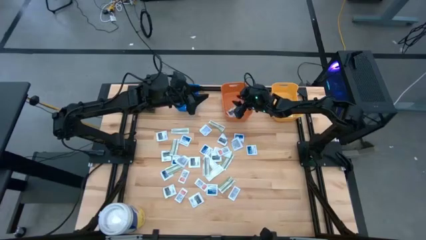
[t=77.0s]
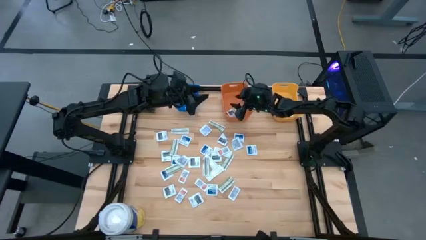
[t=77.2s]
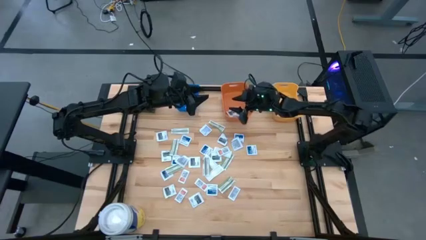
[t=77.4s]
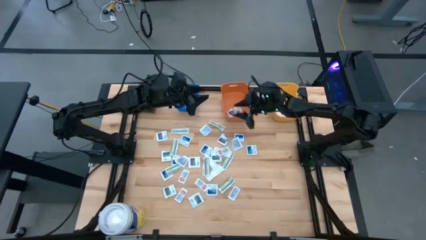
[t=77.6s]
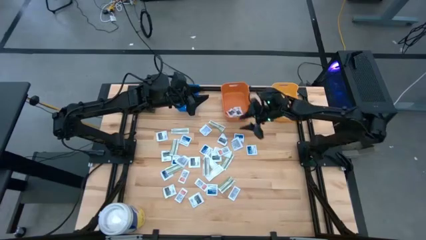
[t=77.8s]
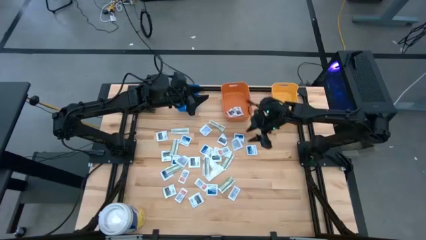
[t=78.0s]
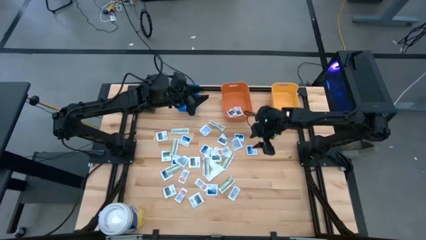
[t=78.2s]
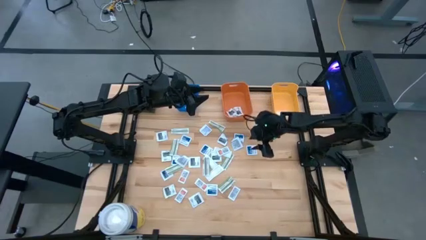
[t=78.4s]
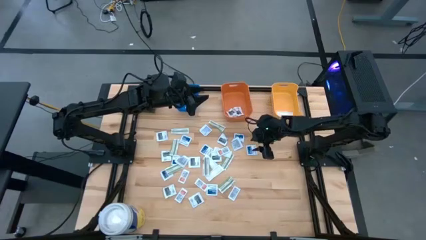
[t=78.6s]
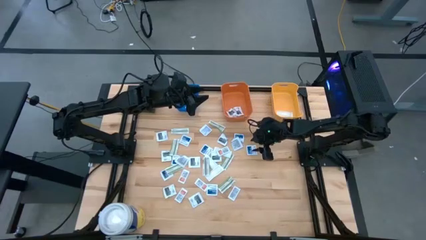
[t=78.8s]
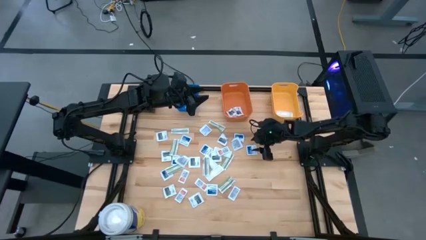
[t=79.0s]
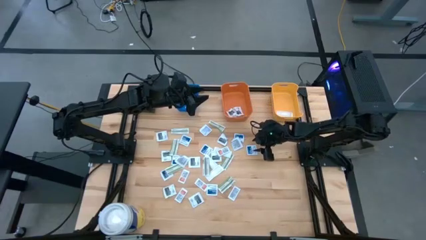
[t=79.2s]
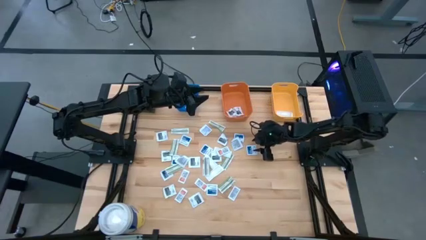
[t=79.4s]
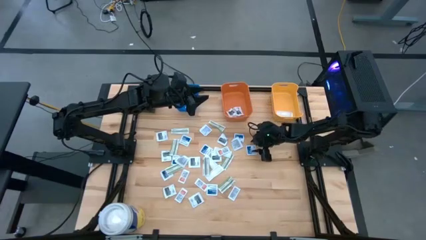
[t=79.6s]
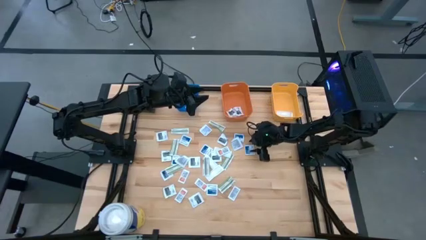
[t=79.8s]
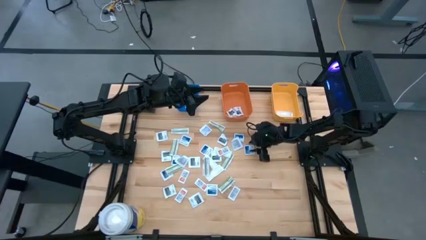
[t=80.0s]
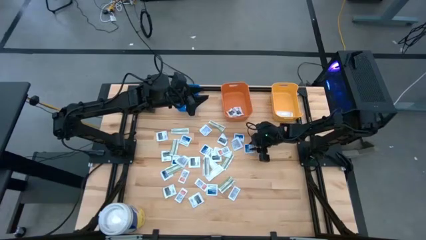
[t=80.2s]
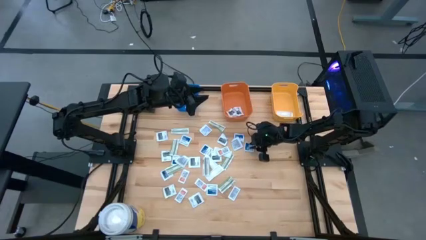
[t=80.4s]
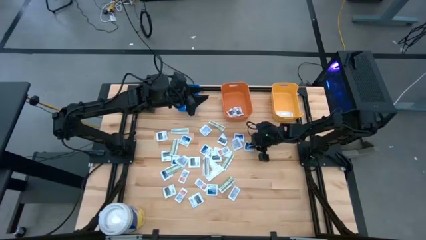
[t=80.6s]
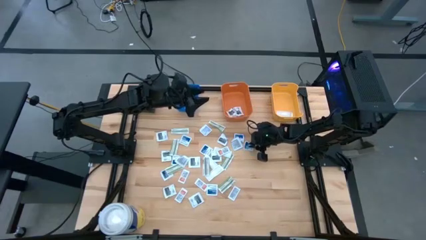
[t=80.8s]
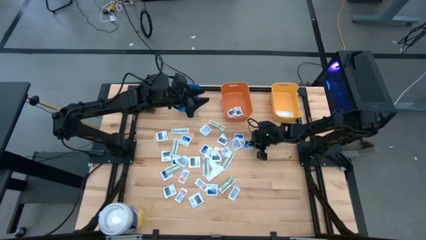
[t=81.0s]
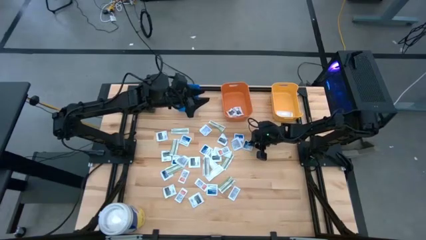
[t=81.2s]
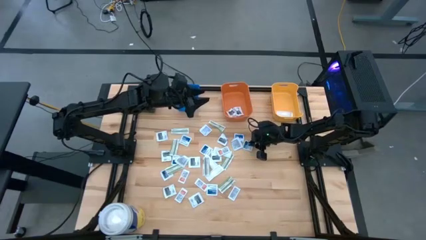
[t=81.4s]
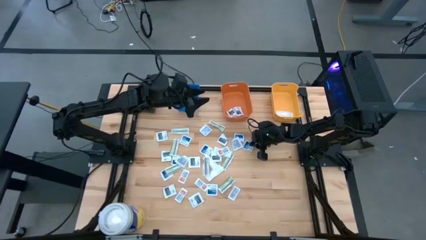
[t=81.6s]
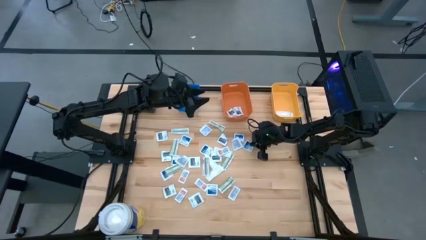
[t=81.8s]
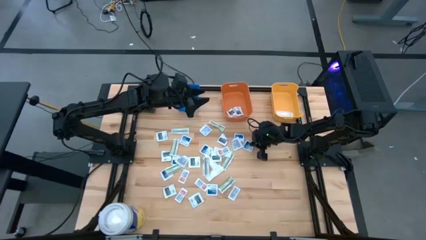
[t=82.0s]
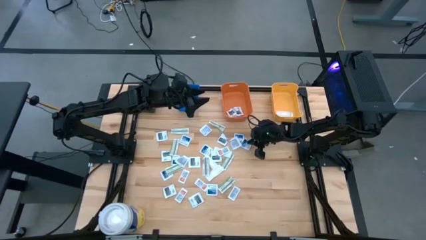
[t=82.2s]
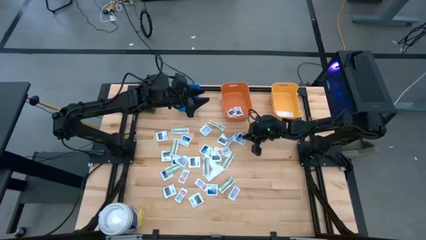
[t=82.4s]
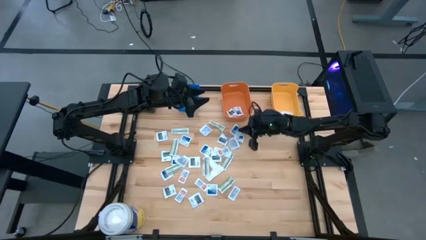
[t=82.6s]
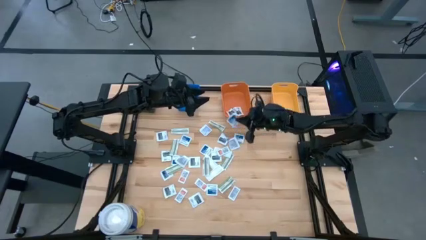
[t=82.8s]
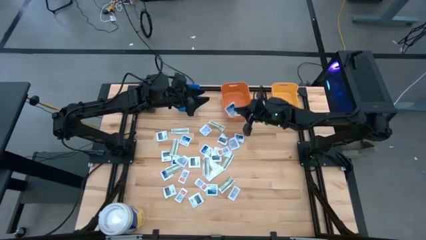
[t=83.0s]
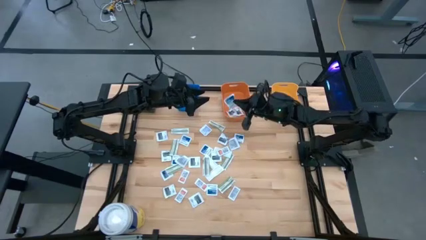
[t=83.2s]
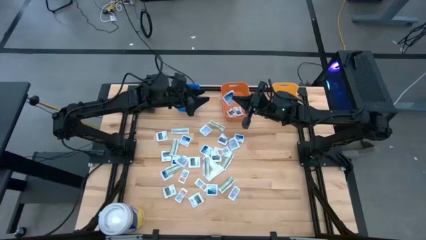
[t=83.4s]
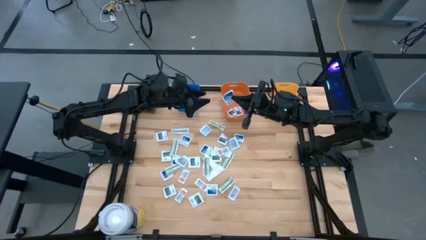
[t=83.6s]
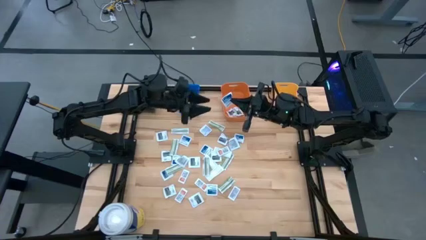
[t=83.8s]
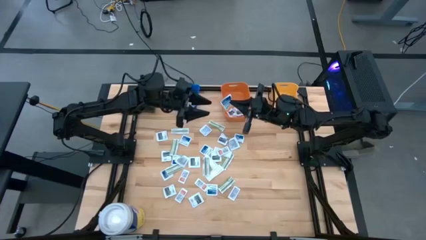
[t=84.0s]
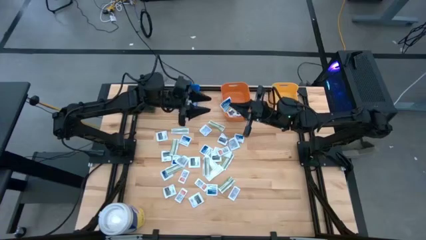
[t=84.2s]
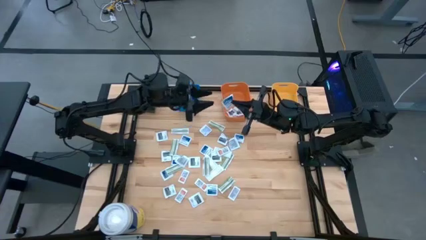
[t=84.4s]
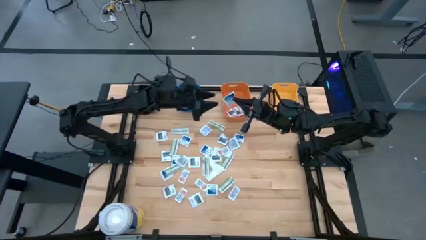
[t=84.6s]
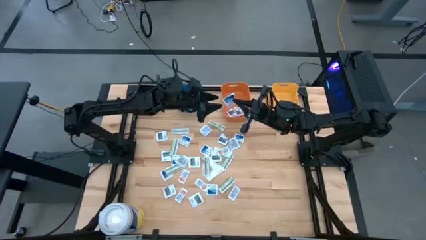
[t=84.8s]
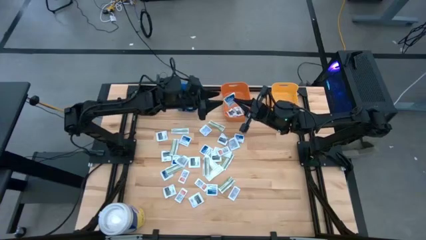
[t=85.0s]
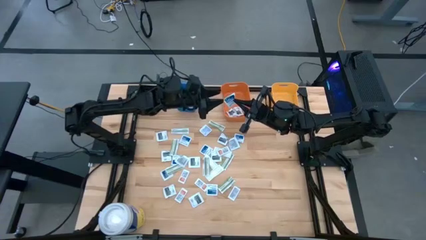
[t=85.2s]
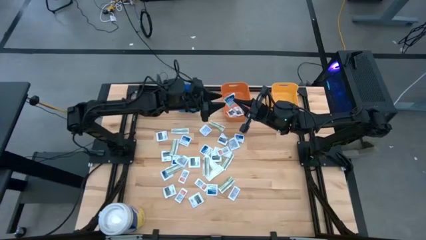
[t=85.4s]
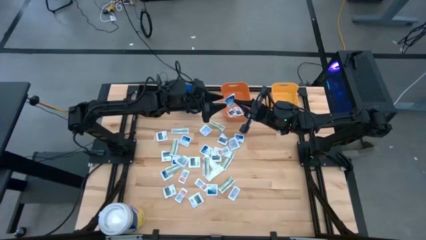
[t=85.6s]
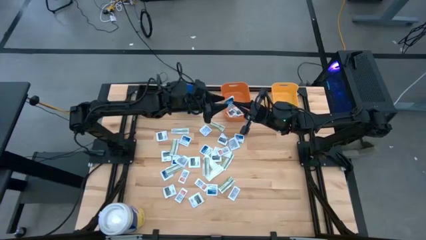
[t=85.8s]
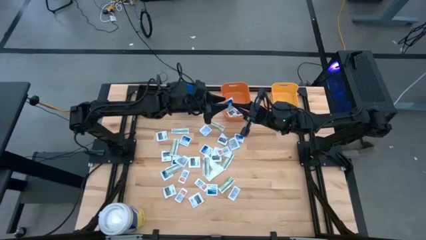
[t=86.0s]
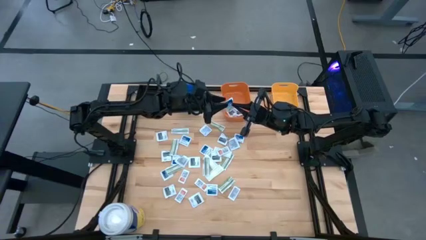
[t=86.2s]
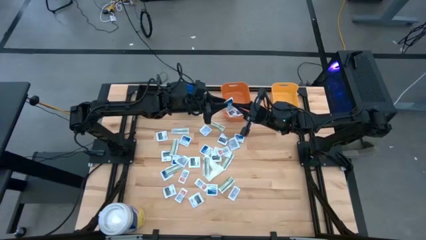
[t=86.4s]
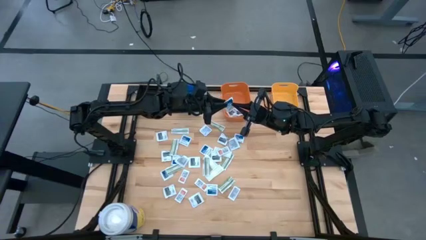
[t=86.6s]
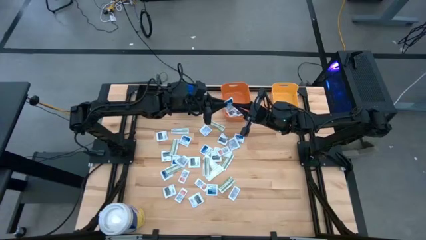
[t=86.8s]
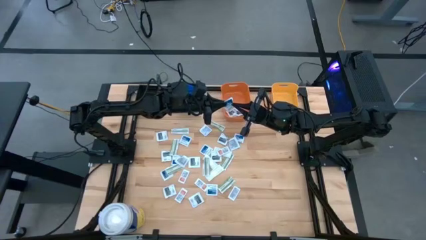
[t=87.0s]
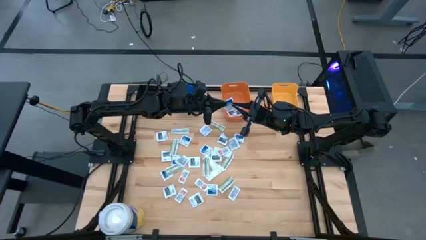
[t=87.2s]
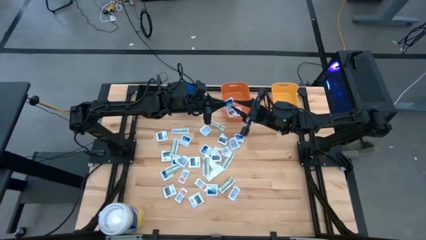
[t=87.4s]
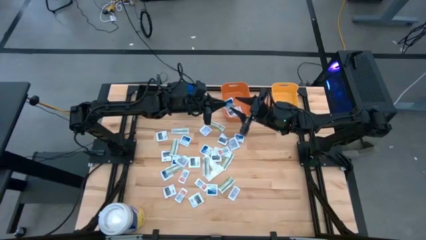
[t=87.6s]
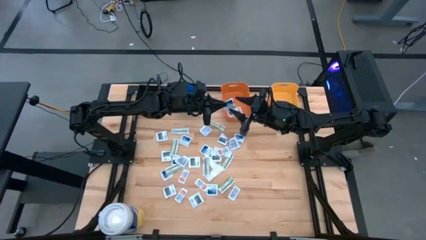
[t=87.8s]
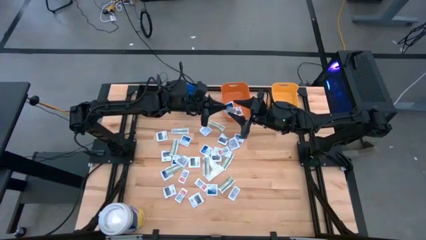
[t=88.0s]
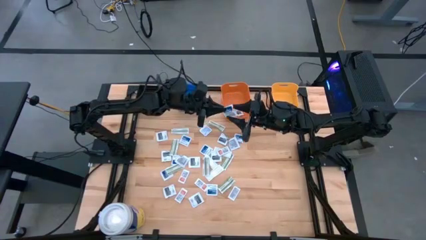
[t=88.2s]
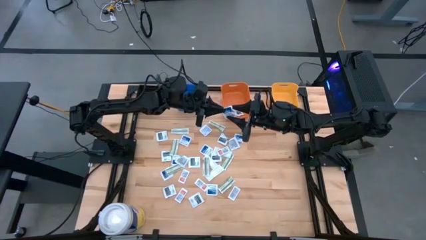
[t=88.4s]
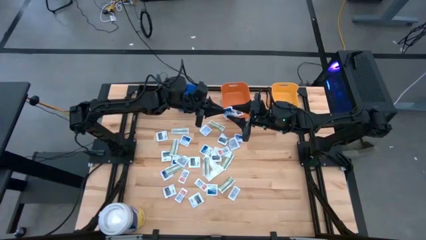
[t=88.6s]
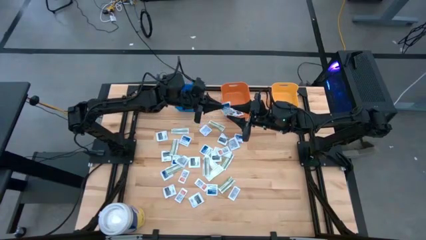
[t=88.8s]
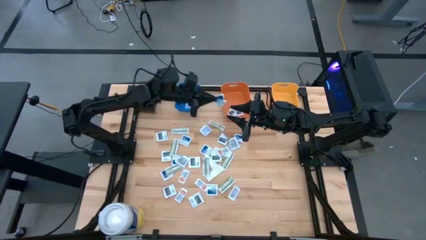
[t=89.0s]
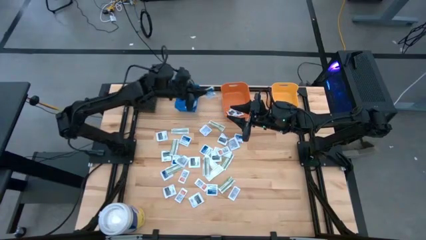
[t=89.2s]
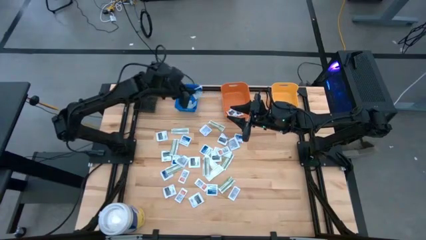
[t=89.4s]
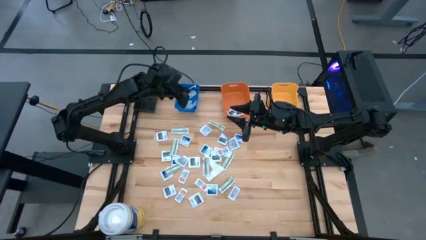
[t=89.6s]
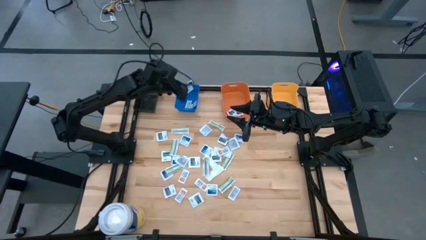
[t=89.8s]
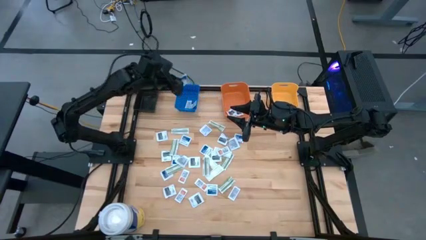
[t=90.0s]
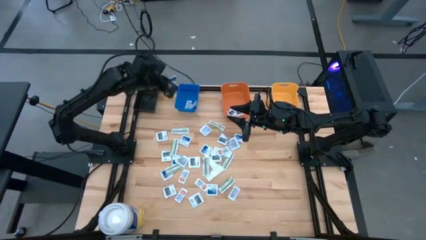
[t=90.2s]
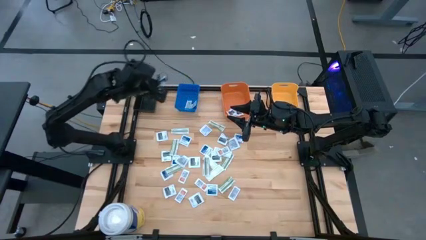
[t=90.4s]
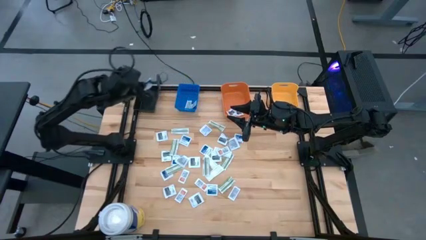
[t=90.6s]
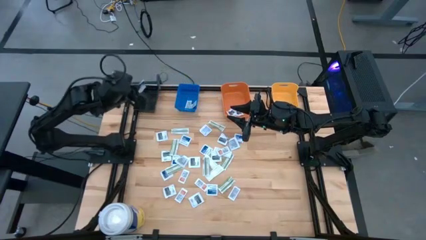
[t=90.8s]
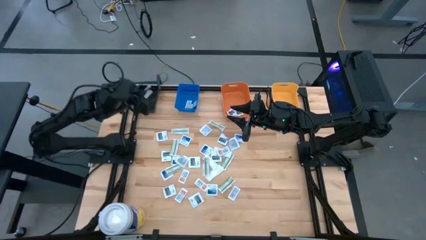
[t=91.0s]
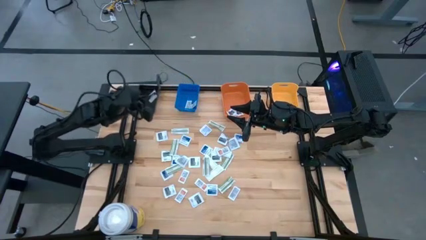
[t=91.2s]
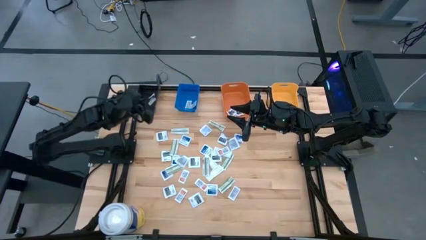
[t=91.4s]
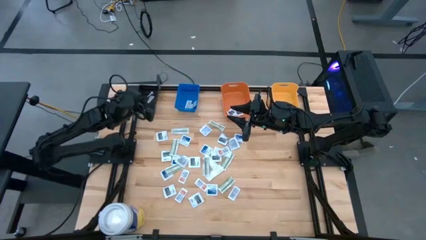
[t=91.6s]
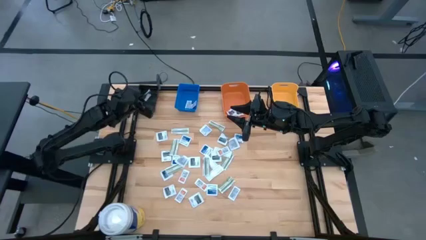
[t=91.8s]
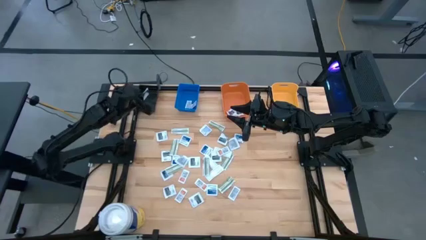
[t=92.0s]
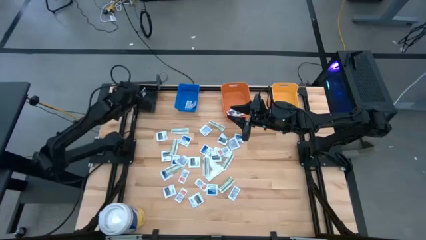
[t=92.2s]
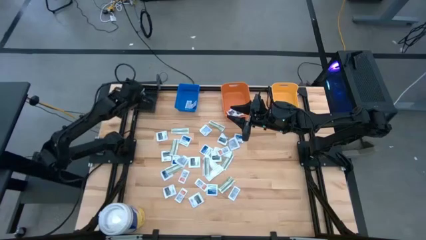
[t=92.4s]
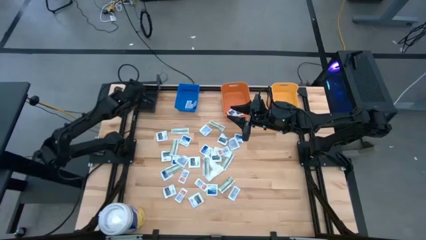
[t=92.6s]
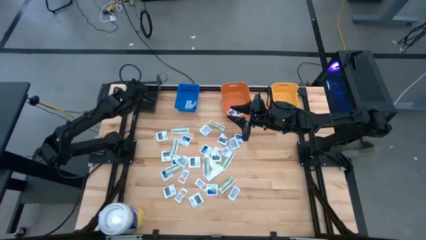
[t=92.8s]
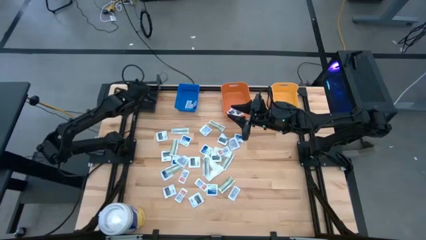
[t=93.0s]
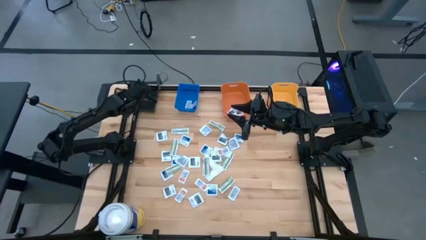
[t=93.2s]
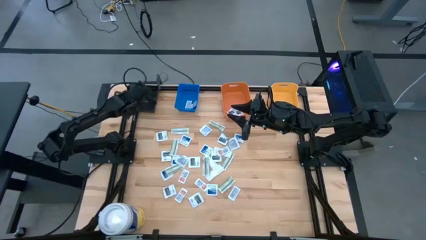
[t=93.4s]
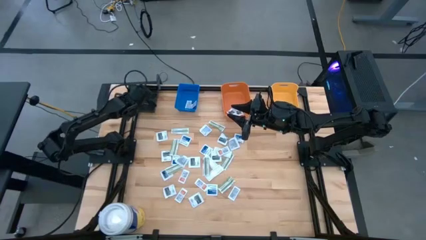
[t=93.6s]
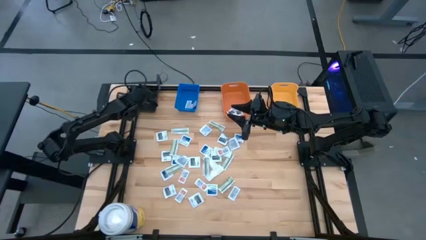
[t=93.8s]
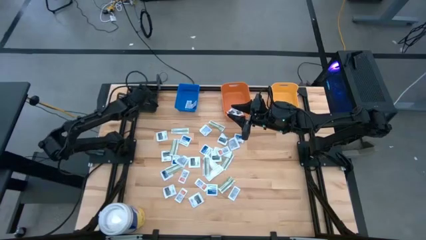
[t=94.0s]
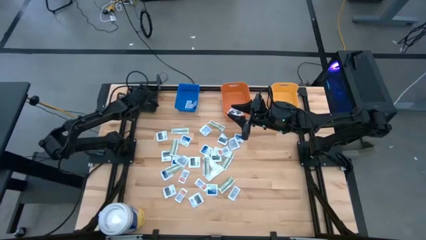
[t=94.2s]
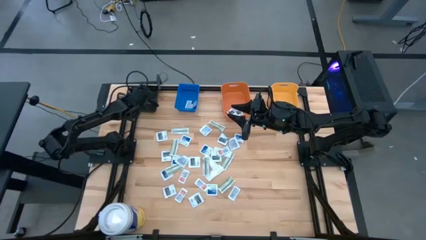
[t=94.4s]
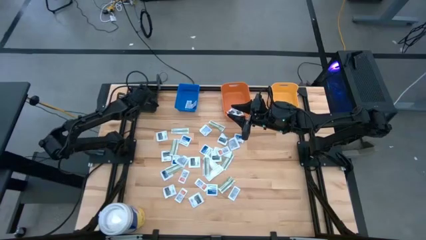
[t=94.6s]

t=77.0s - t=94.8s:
Task: Pick & Place First Aid Supplies
Put the alcohol pad into the black bin
